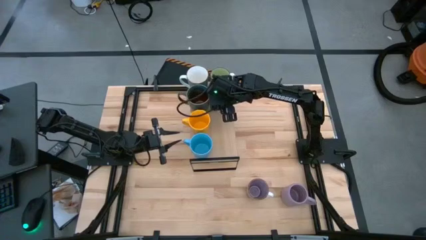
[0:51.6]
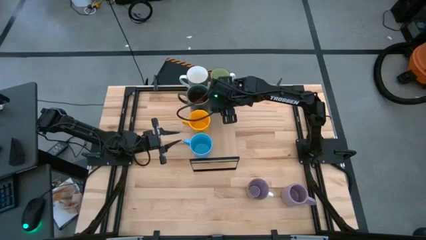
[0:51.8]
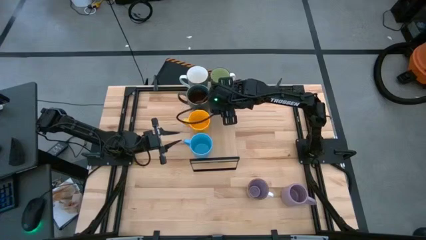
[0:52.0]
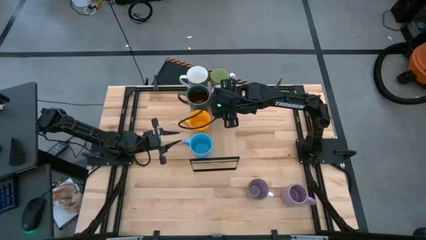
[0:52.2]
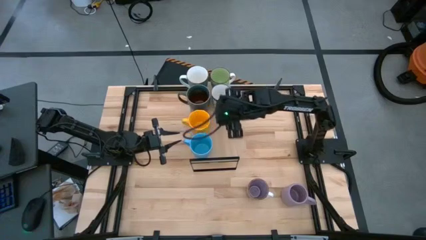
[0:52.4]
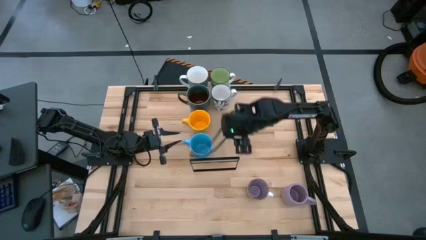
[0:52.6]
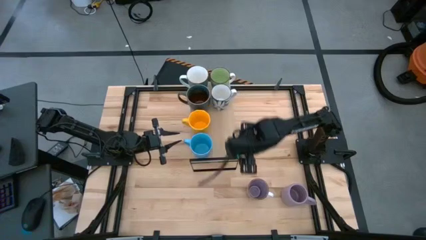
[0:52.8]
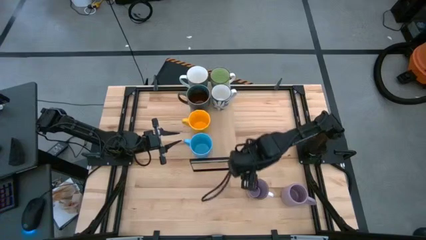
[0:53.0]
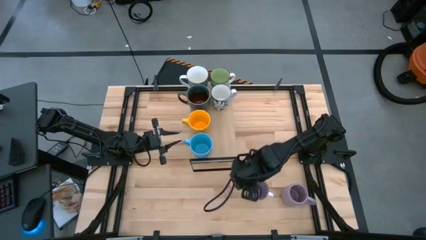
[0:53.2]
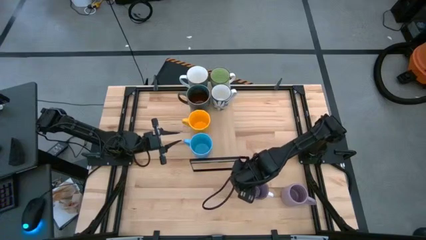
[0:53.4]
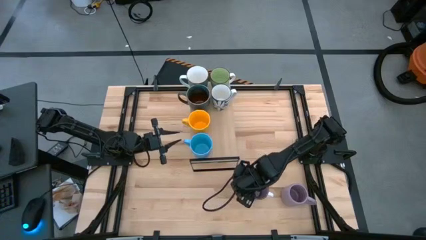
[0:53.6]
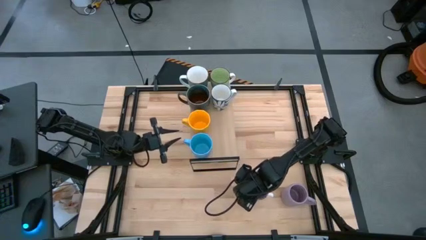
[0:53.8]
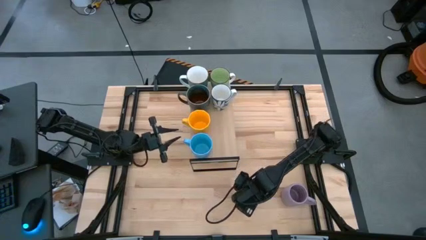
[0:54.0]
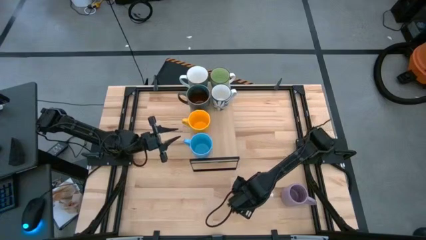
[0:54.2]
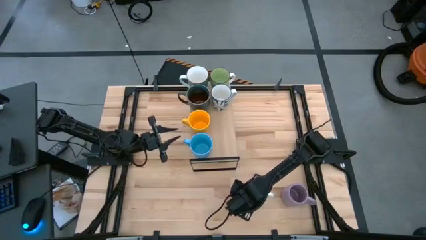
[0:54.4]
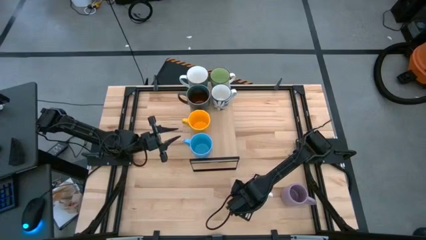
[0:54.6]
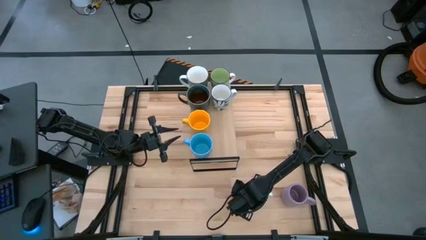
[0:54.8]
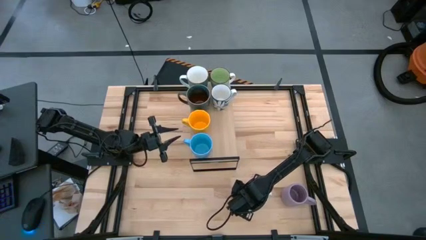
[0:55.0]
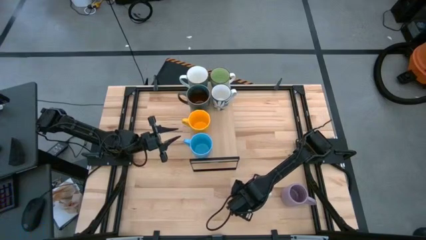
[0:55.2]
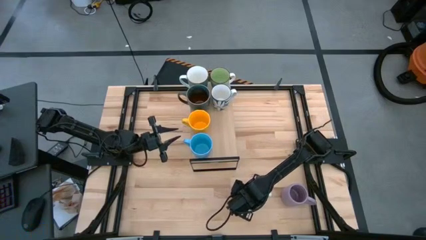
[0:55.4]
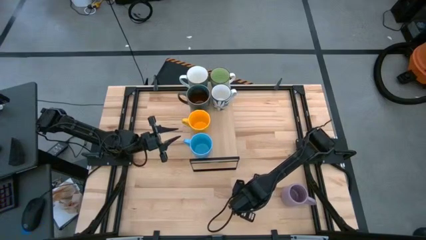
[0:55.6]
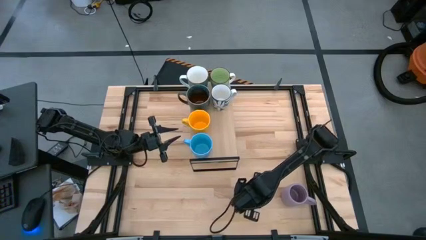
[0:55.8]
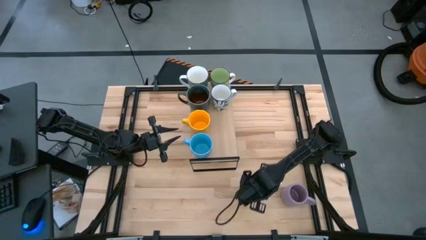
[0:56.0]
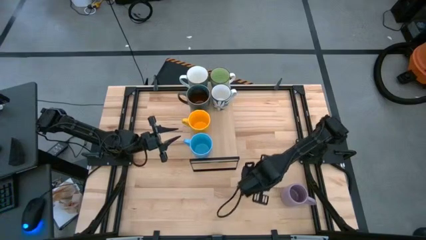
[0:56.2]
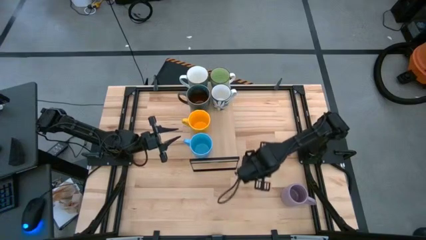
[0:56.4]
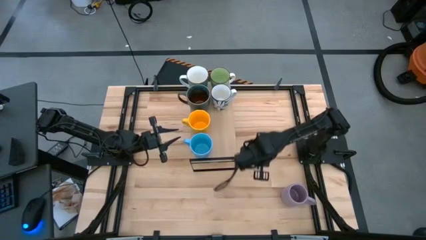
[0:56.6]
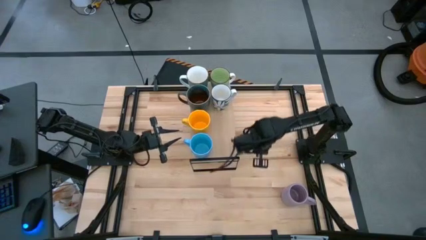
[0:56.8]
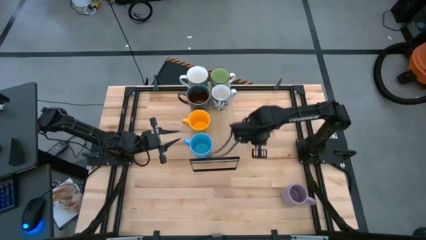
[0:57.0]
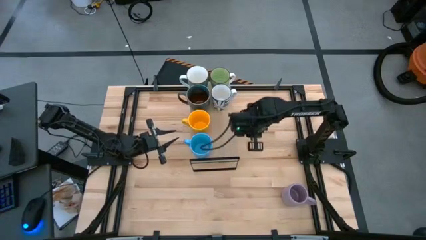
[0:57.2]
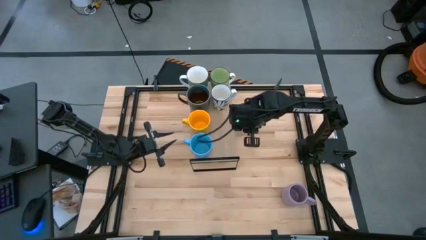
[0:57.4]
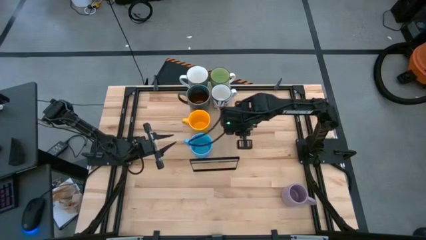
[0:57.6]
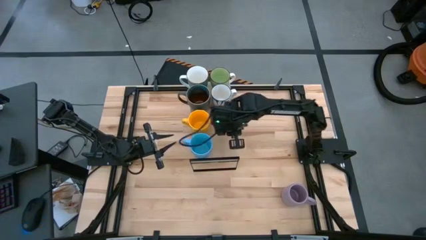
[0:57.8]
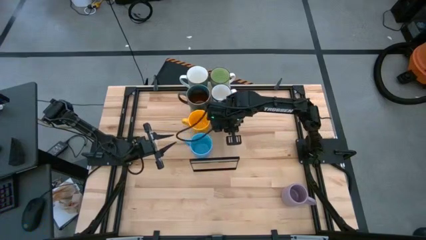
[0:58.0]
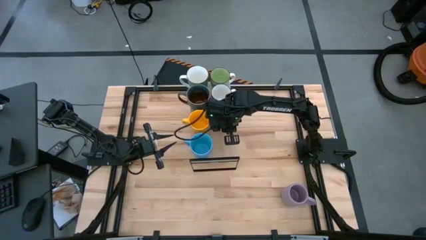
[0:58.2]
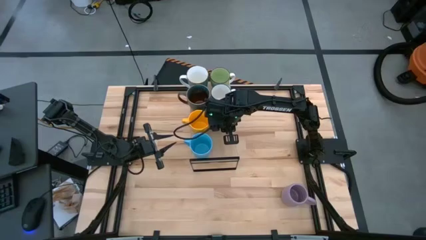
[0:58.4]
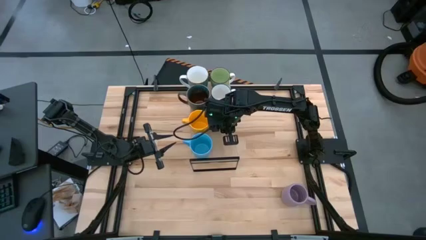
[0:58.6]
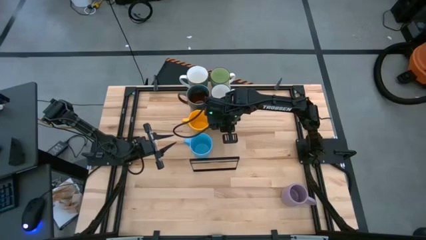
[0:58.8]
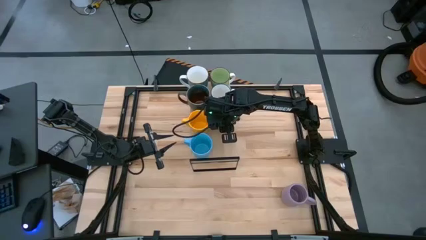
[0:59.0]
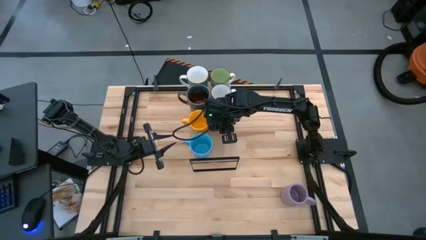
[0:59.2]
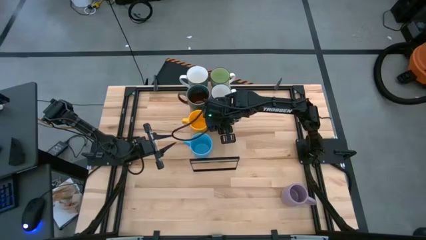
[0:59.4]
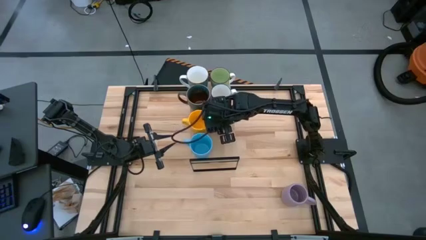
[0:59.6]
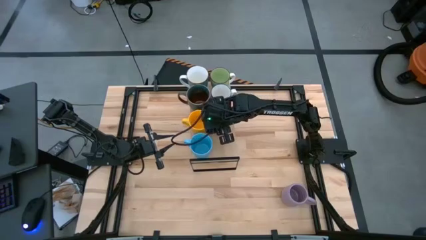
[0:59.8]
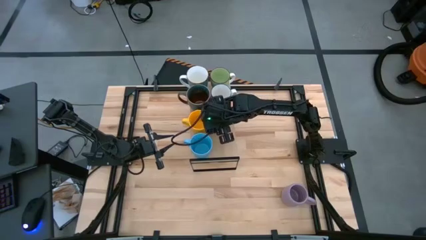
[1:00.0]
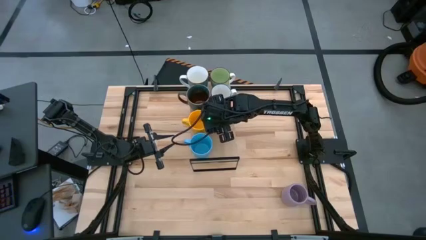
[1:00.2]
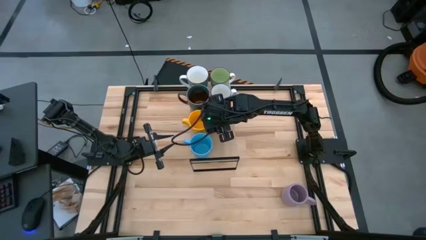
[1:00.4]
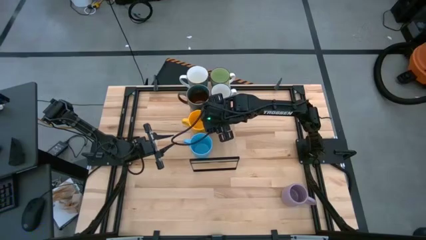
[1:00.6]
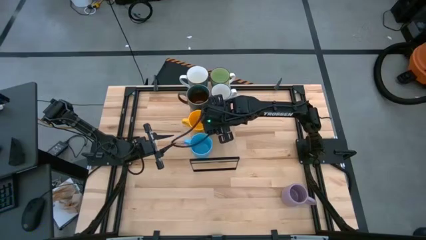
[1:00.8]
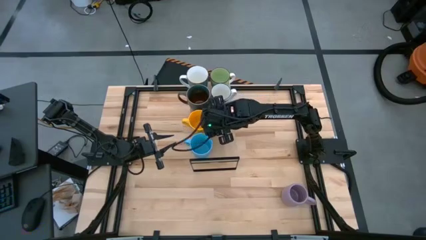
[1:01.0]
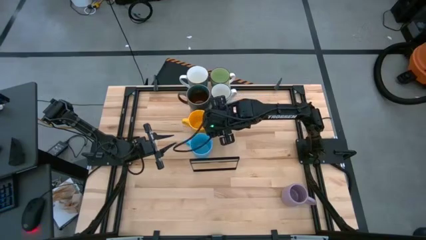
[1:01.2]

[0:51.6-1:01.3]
Task: Place coffee mugs
Put the light violet and white mug on the shelf aligned with the yellow mug

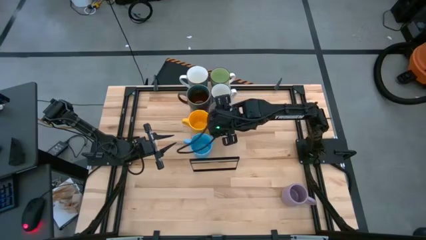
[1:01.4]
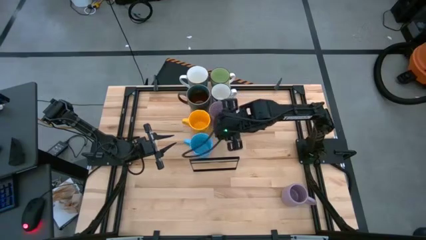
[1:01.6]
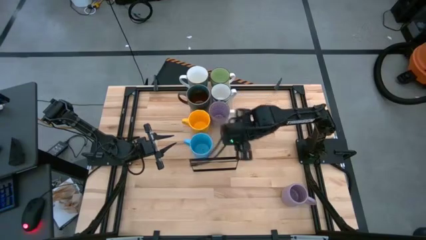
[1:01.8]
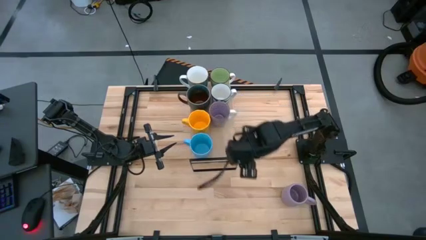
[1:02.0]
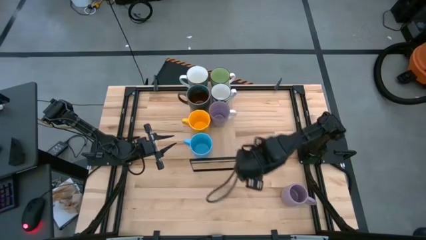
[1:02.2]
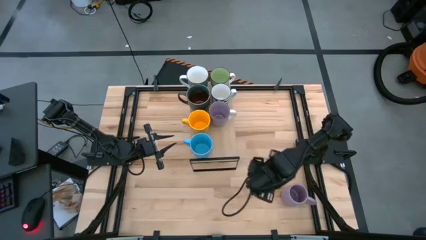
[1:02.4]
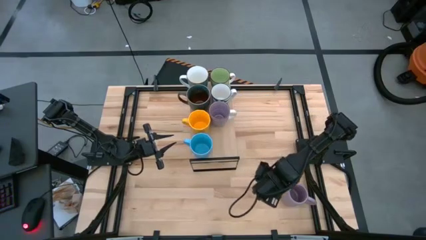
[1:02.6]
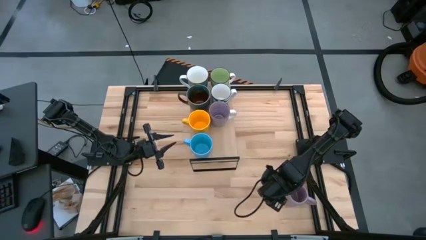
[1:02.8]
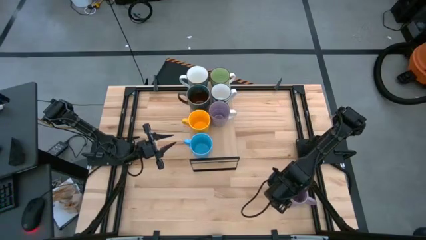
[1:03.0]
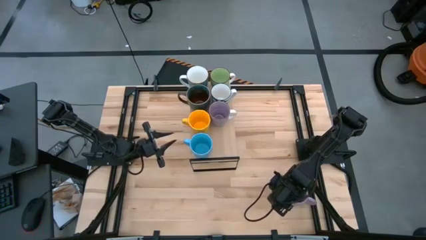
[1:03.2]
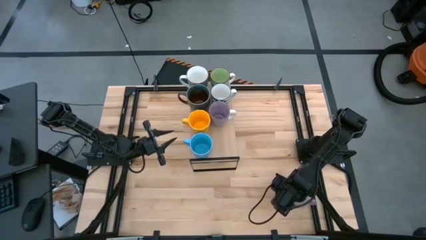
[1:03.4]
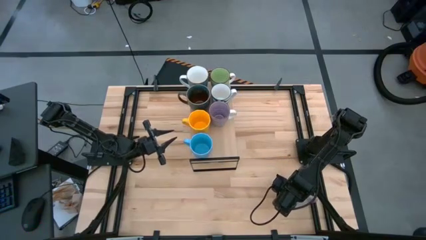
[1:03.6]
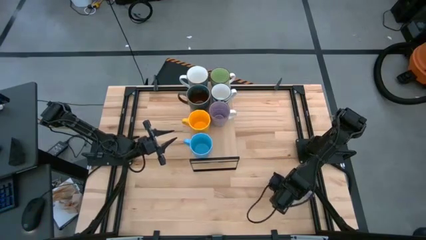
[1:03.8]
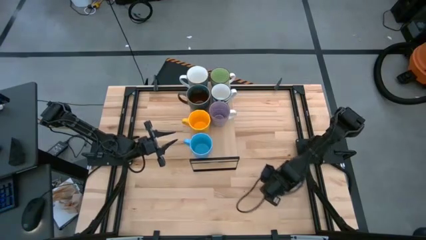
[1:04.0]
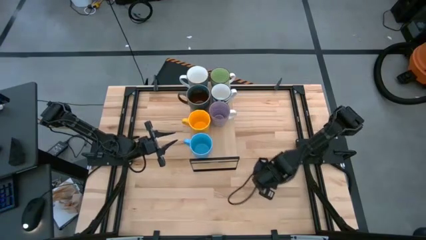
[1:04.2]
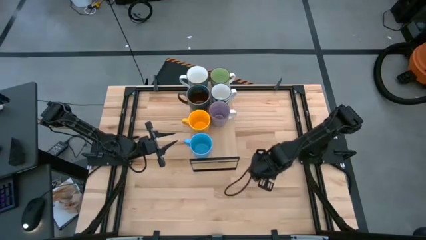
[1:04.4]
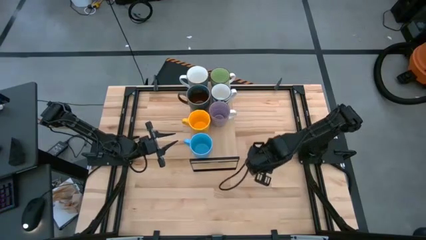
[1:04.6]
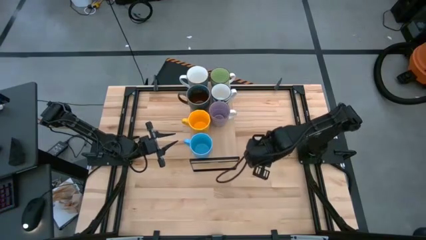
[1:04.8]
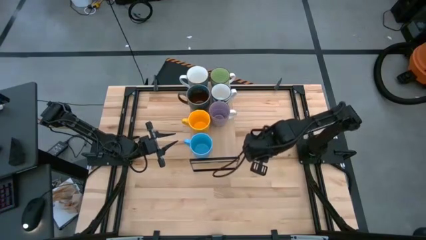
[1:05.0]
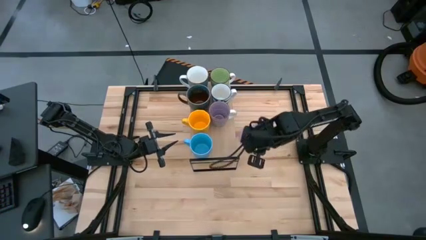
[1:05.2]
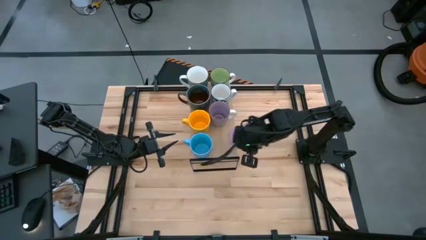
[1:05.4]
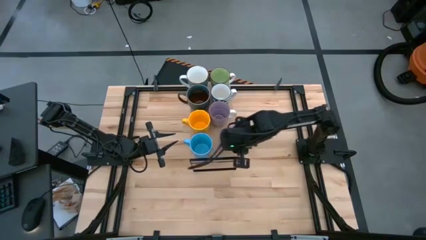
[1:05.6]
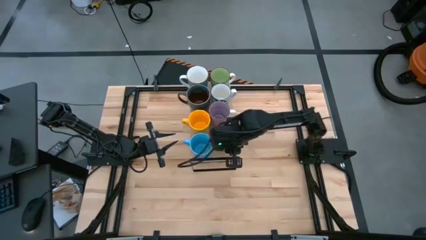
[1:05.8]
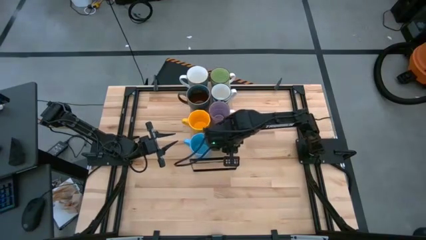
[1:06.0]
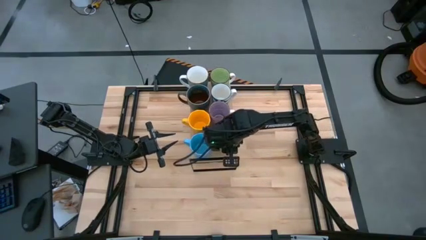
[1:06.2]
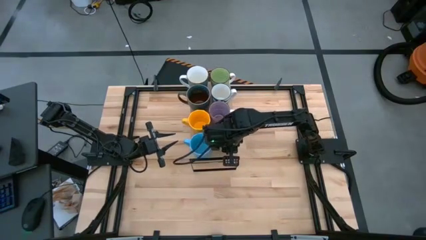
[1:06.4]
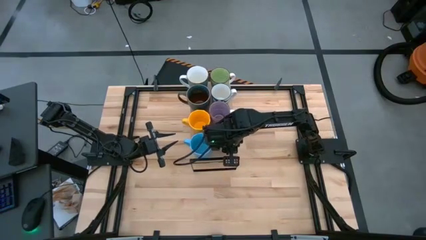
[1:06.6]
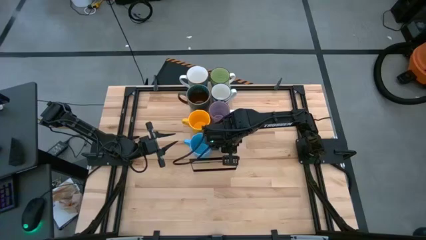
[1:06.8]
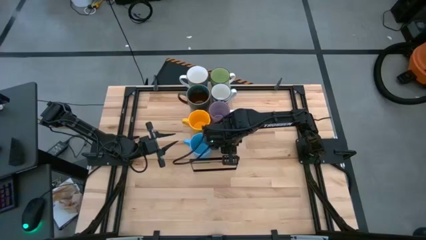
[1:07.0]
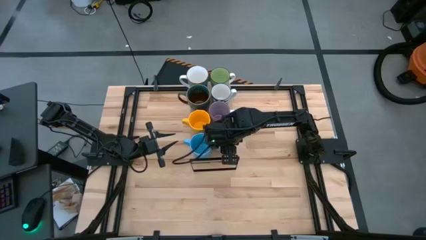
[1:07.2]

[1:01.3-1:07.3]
Put the light violet mug on the shelf aligned with the light blue mug

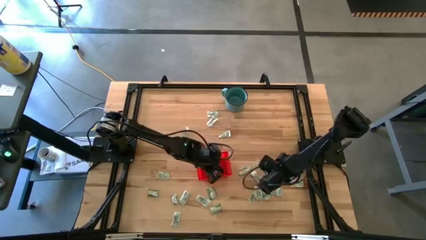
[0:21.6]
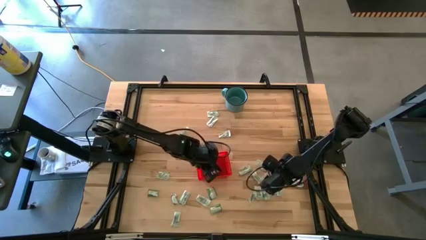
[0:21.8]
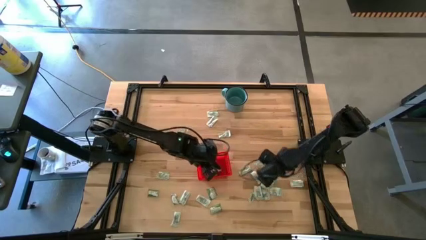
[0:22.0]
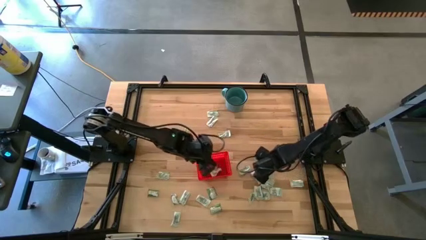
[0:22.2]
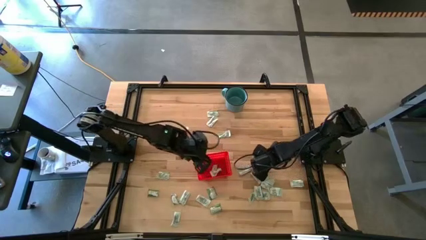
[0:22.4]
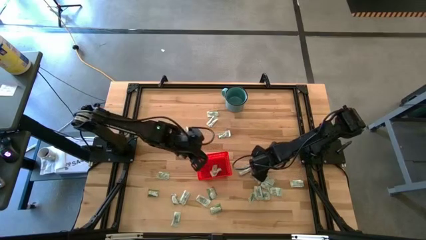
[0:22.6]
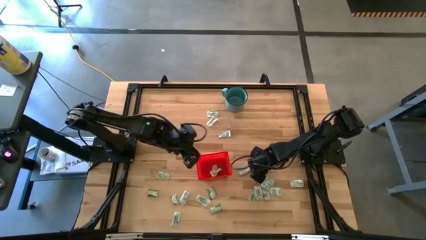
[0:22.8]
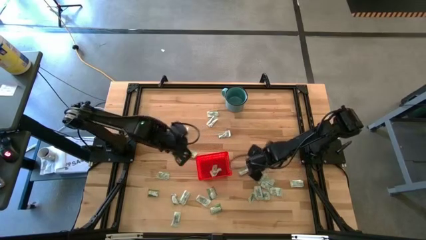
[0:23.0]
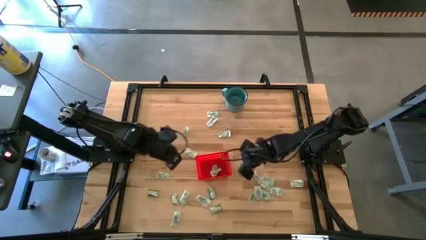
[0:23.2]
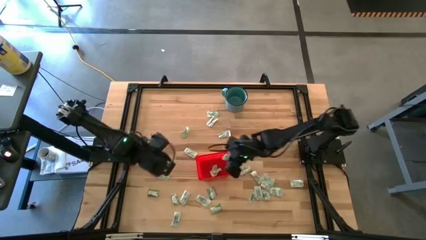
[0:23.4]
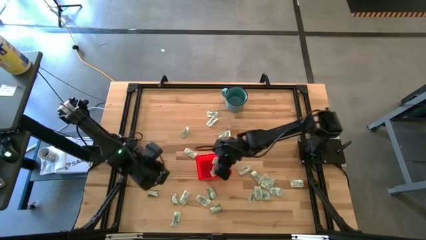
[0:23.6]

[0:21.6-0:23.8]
Task: Pick and place Stevia / Truvia into bins
Put the green stevia packet into the red bin
